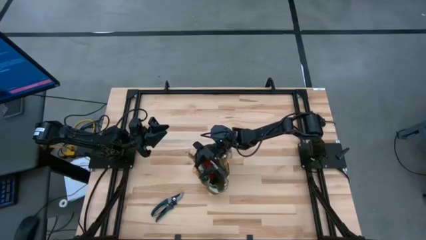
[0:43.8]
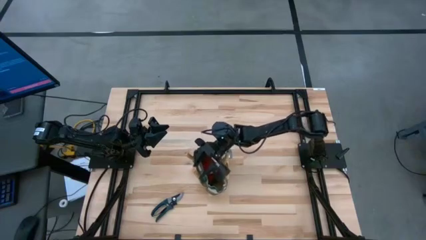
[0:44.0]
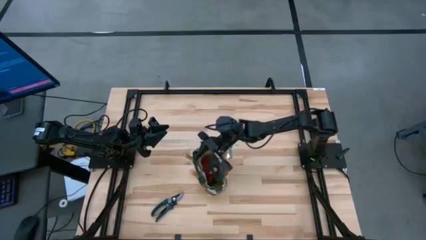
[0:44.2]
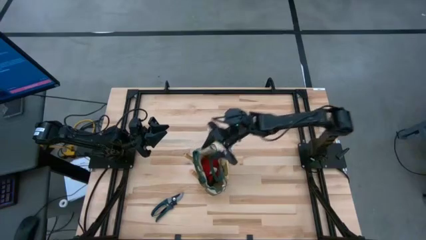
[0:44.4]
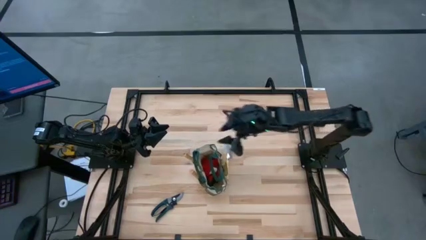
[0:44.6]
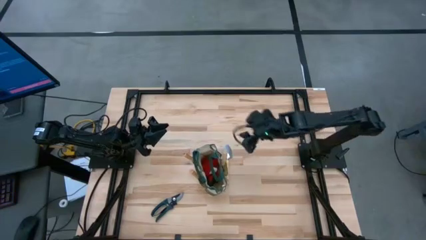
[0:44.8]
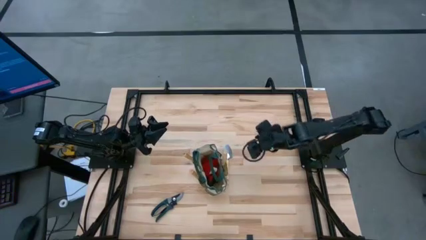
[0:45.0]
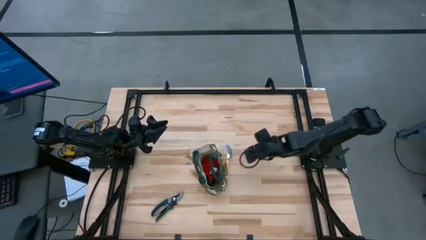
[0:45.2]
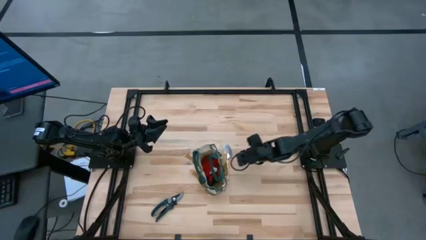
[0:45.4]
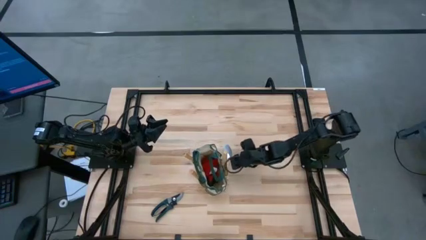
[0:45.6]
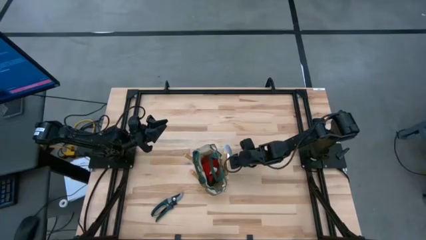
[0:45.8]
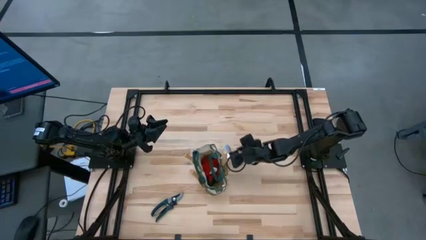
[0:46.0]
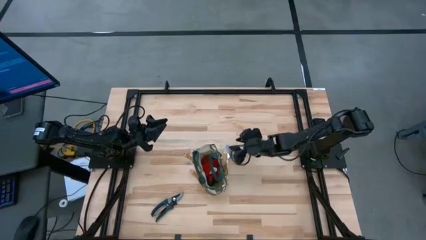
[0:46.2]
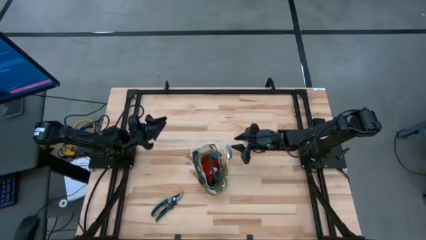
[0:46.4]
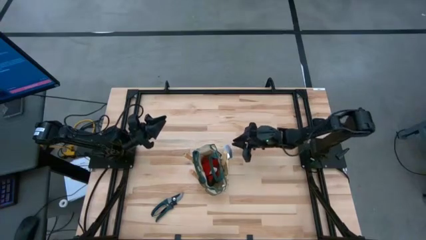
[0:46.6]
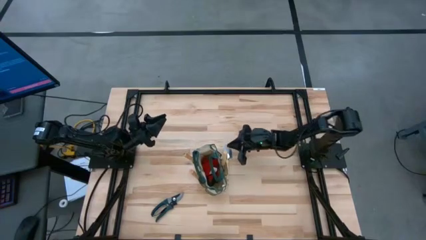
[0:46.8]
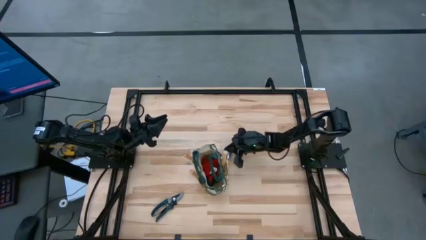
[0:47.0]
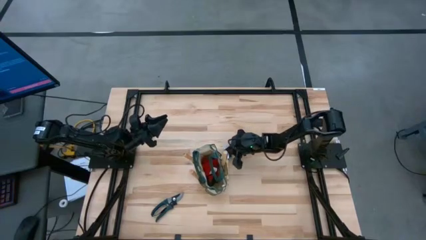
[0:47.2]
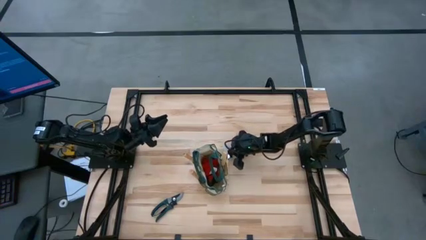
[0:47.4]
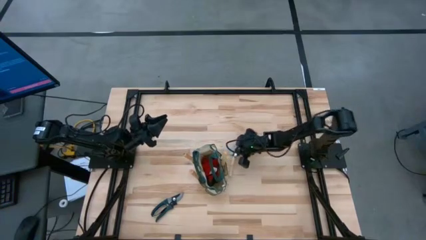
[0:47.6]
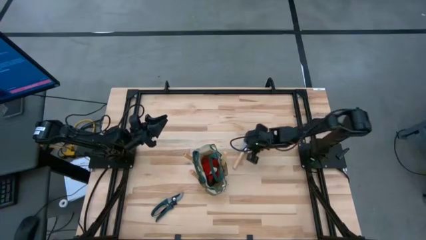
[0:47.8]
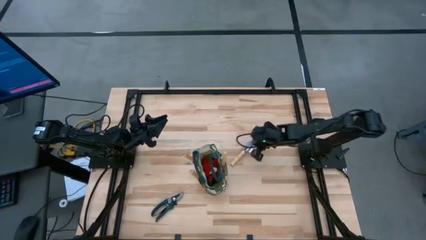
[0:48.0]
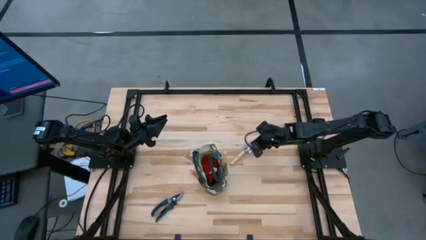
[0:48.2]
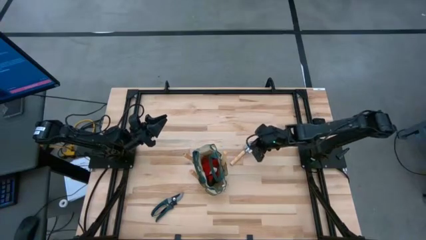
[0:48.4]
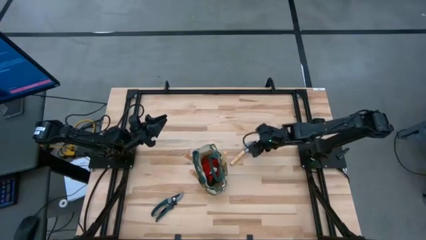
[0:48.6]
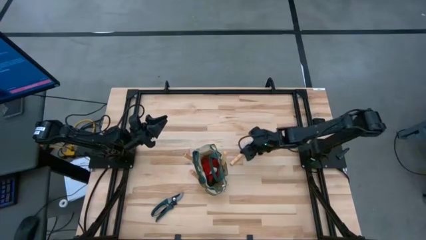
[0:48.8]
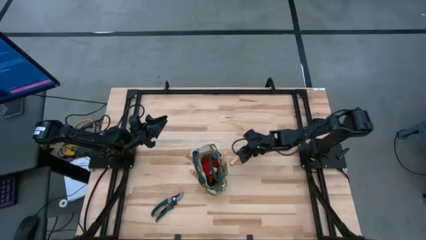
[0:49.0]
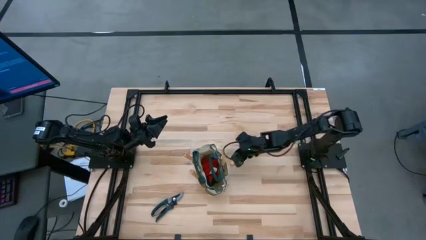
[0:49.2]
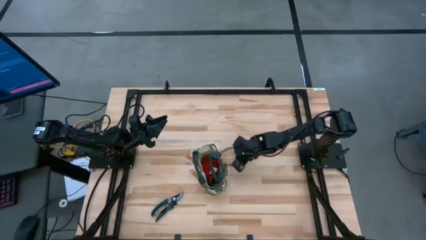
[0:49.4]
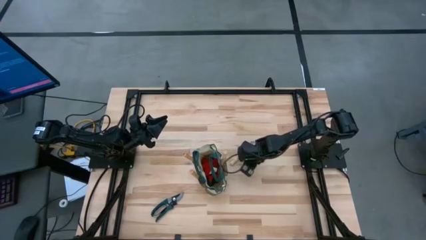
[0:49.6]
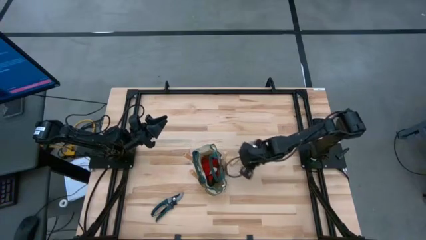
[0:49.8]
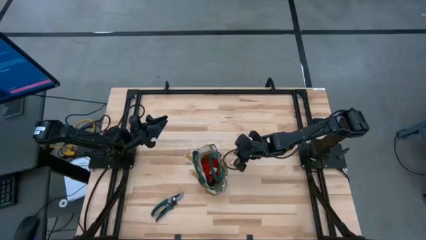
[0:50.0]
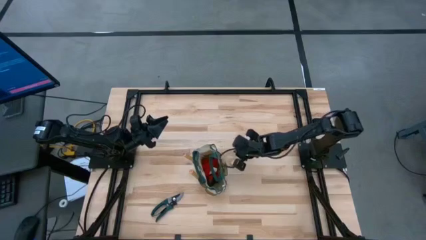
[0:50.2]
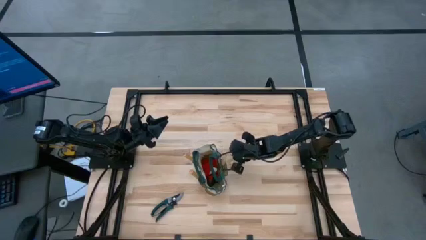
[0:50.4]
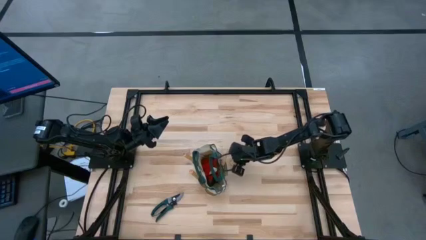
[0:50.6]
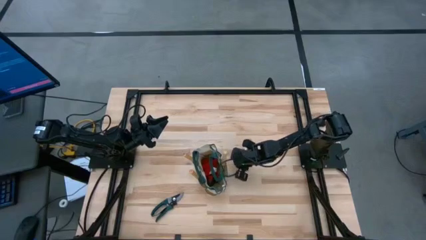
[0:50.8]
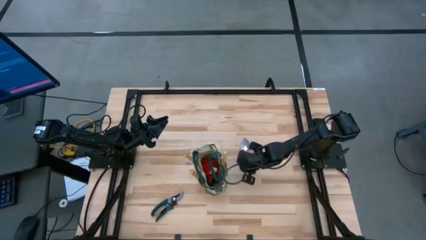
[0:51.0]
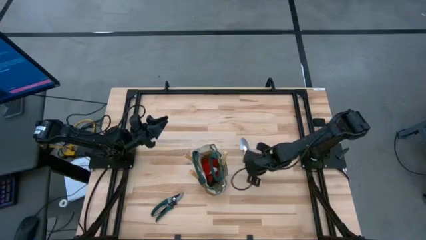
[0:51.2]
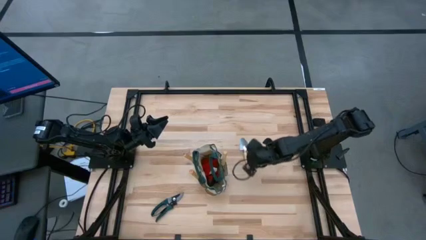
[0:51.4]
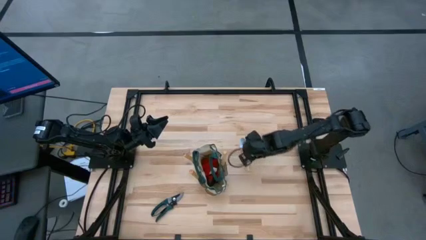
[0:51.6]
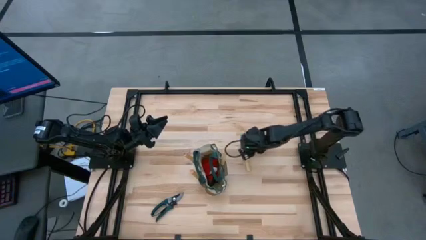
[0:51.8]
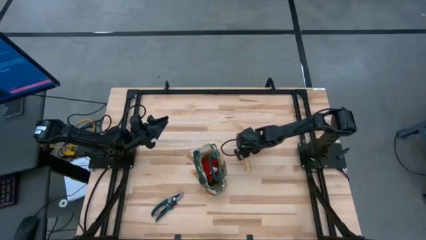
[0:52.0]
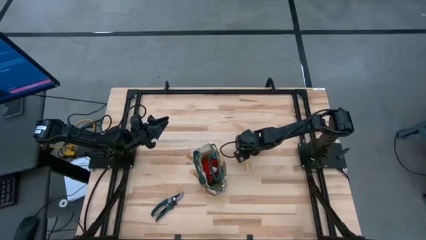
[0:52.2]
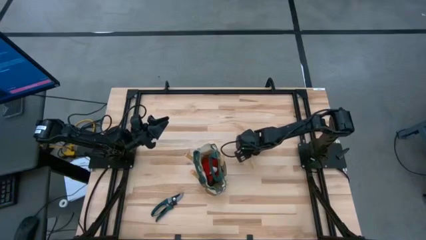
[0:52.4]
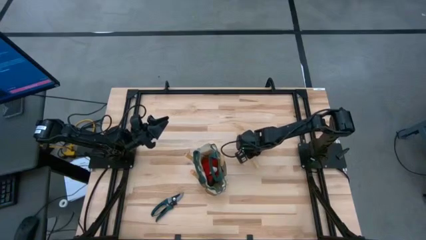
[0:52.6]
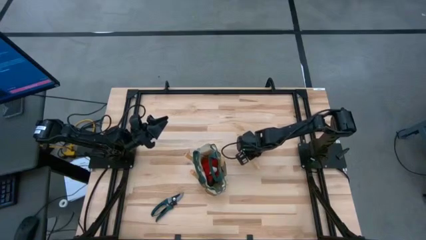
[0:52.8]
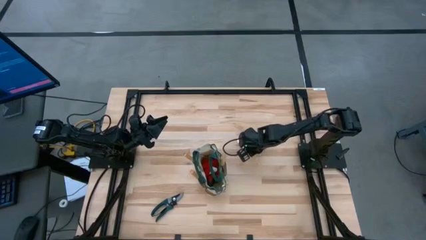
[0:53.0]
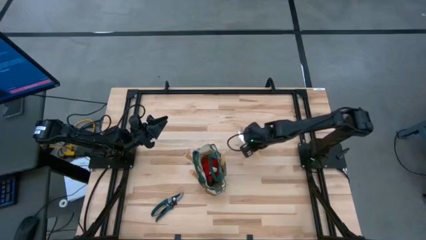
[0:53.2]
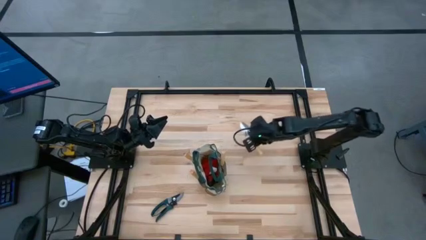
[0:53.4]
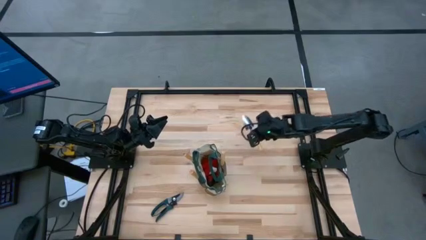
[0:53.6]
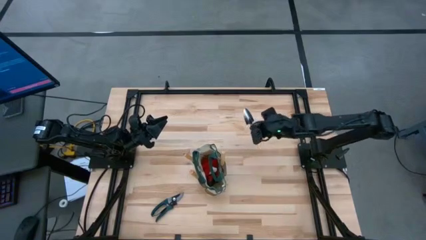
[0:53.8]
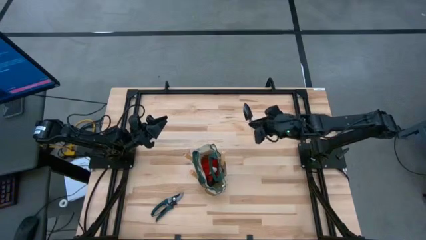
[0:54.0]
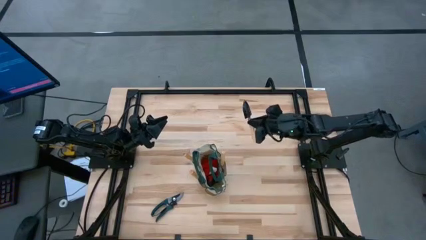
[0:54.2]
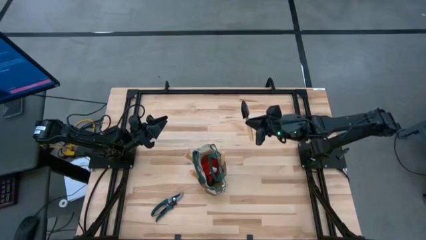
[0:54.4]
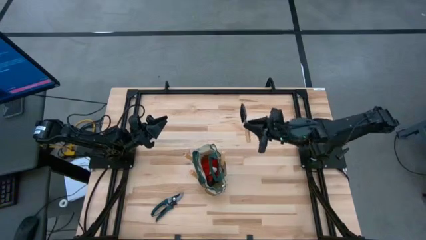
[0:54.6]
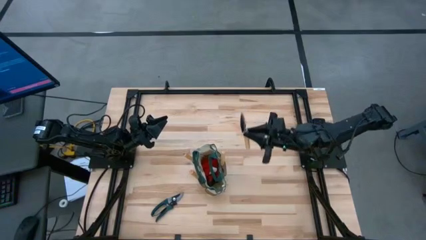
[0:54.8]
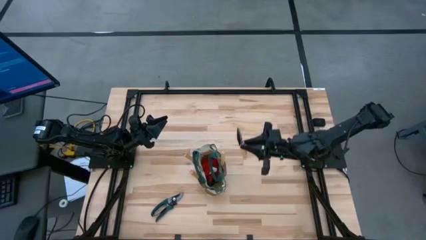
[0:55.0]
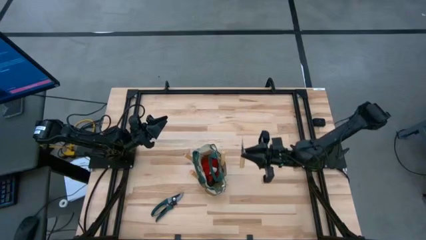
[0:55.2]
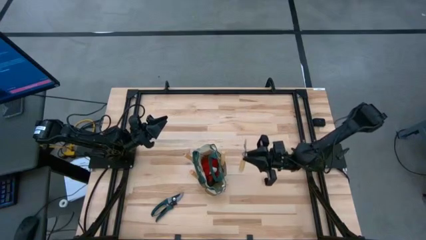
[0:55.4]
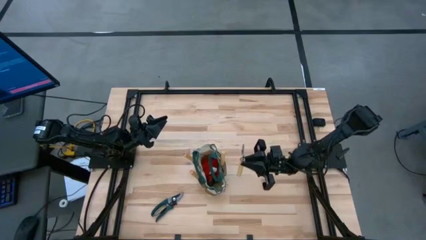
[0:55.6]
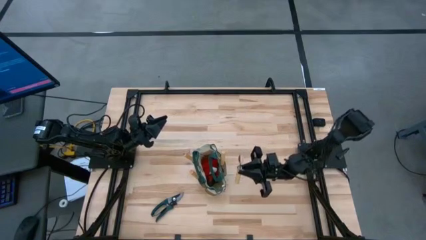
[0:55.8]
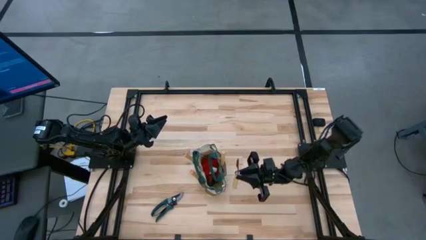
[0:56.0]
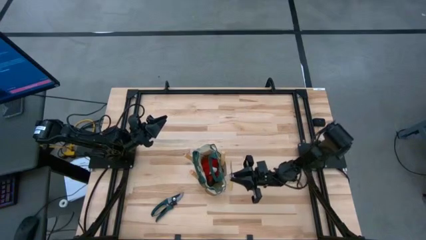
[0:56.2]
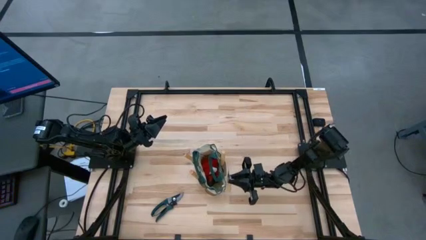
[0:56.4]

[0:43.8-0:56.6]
Task: Pick & Place Garden tools in Gardening bag
Put the trowel into the gardening bag
